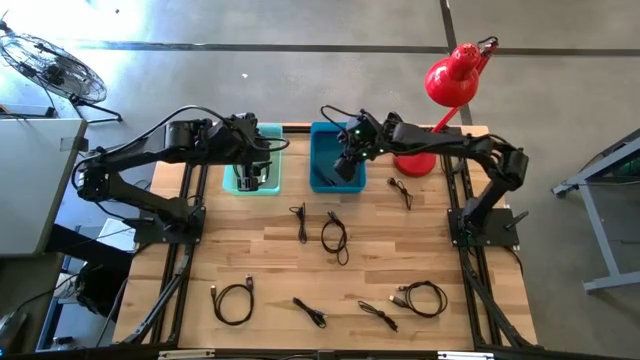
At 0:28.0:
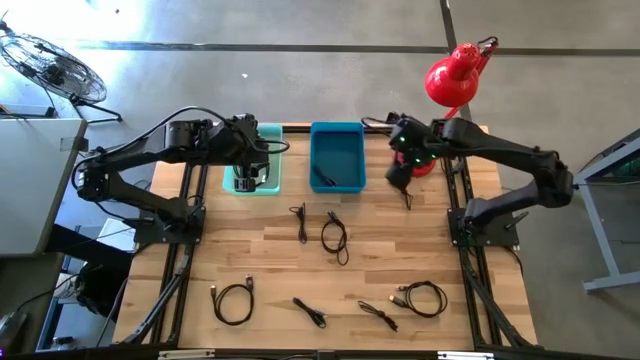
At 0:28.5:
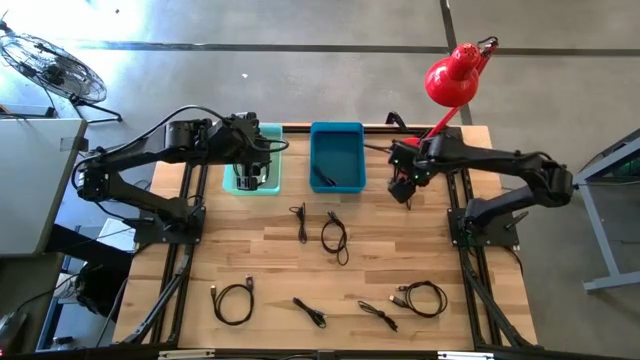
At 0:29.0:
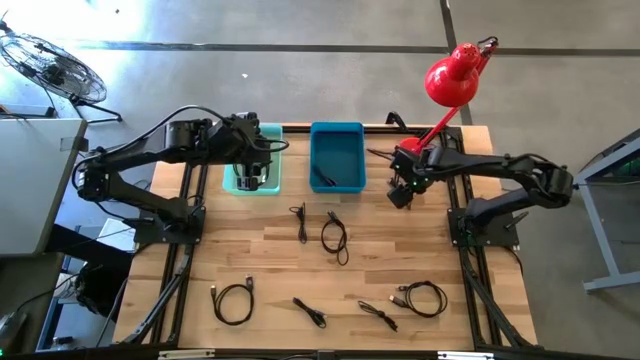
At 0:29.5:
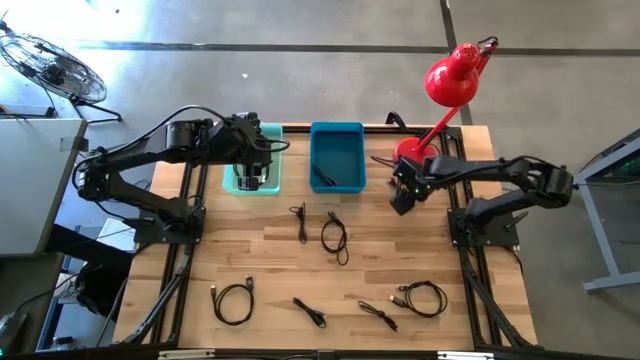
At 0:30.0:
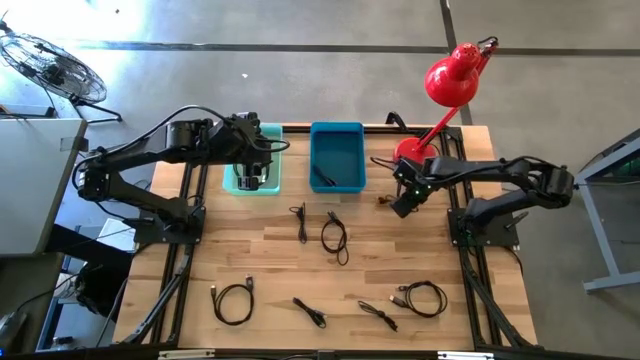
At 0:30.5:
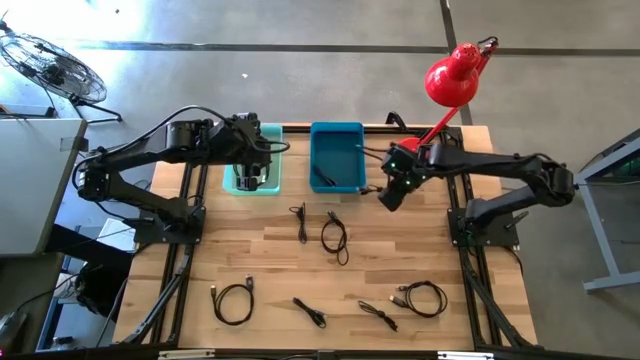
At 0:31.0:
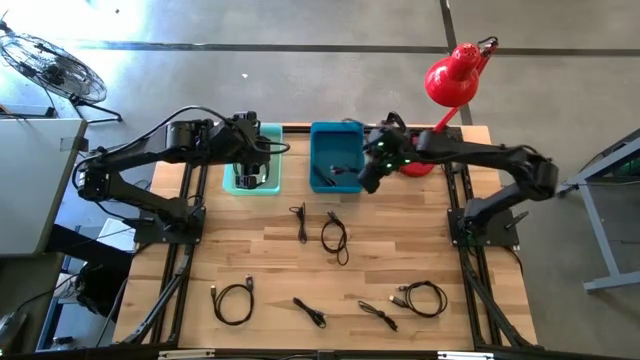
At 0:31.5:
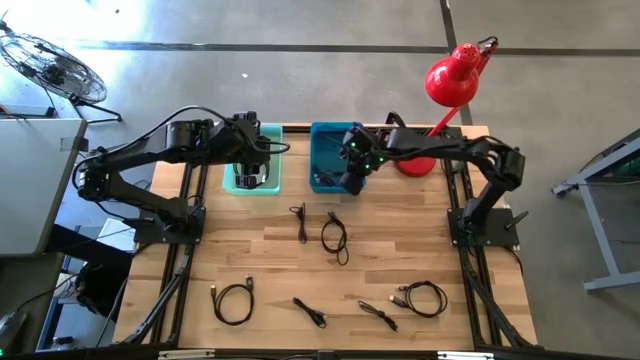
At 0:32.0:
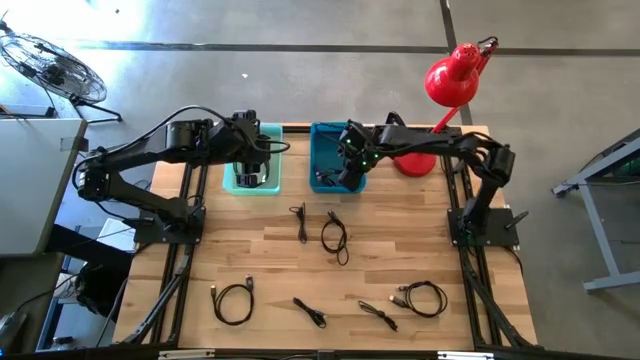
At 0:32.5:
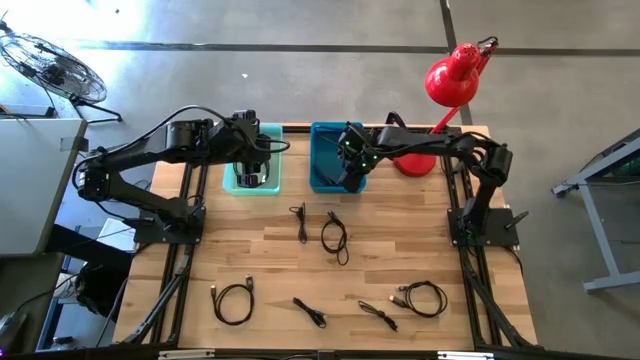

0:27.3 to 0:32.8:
Task: Pick & Place USB Port
Put the black USB cable into the blue bin

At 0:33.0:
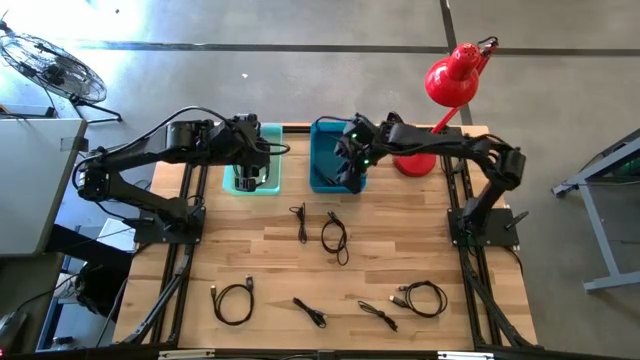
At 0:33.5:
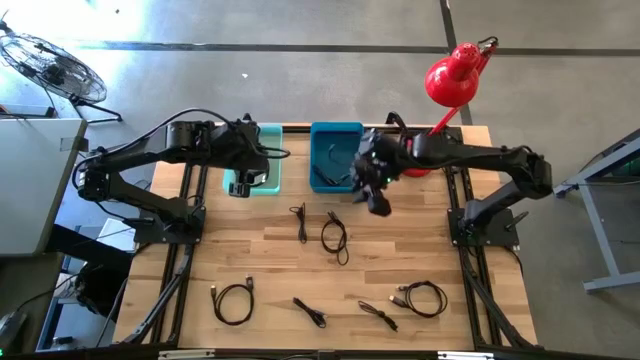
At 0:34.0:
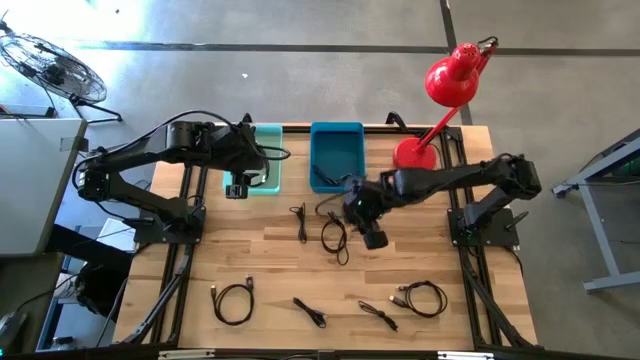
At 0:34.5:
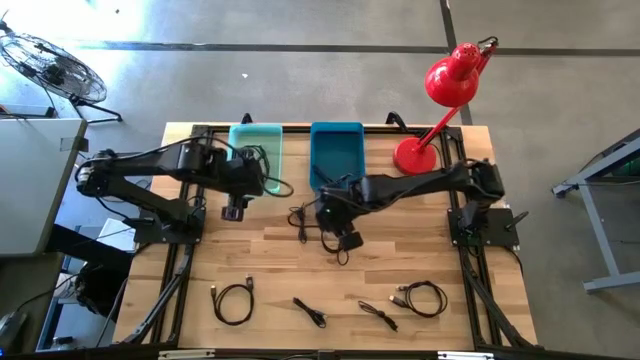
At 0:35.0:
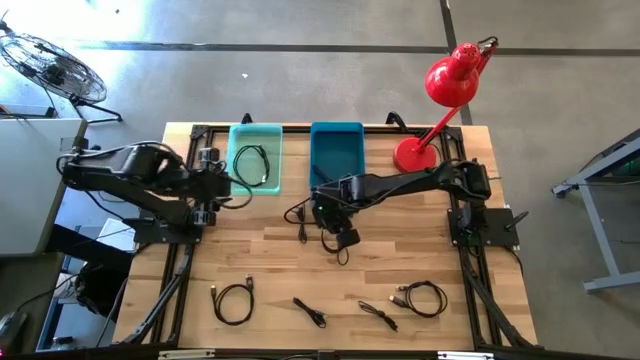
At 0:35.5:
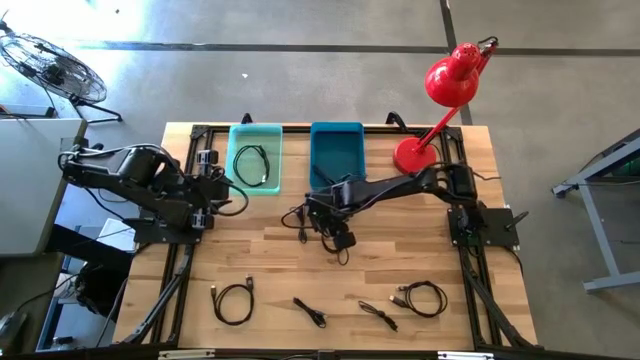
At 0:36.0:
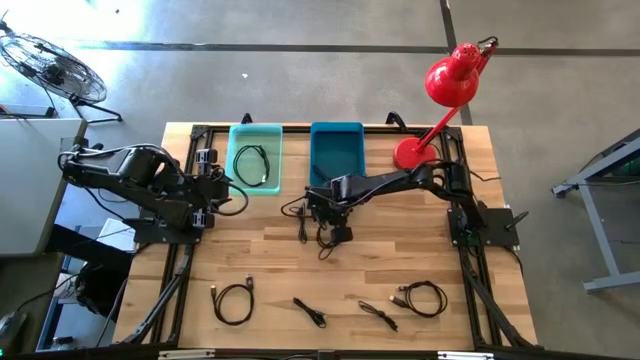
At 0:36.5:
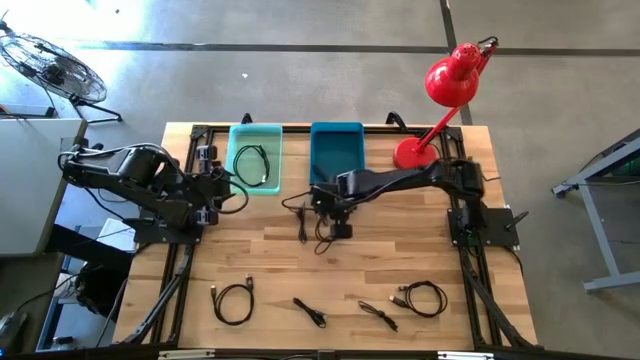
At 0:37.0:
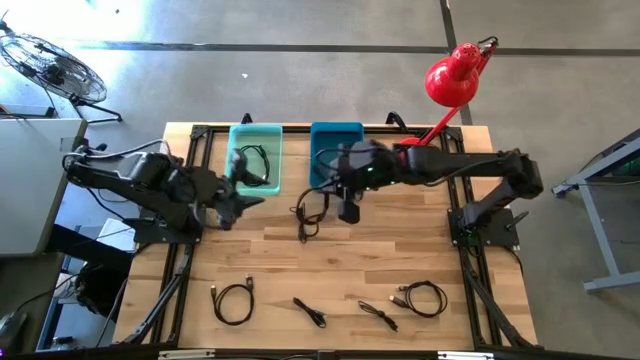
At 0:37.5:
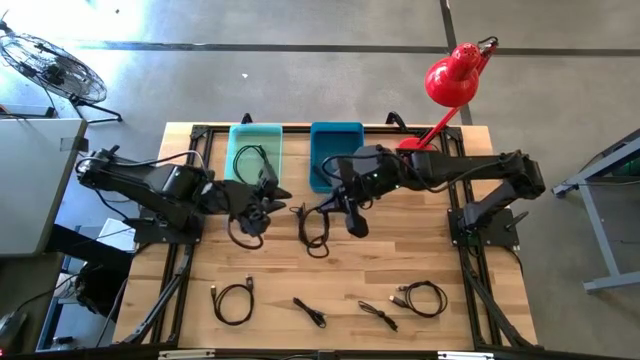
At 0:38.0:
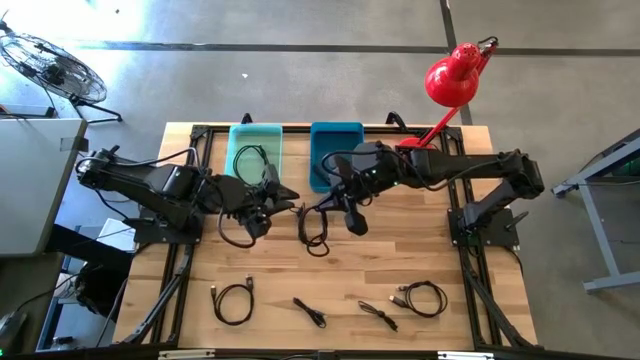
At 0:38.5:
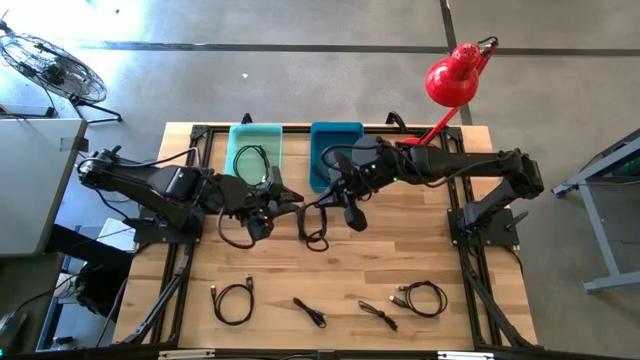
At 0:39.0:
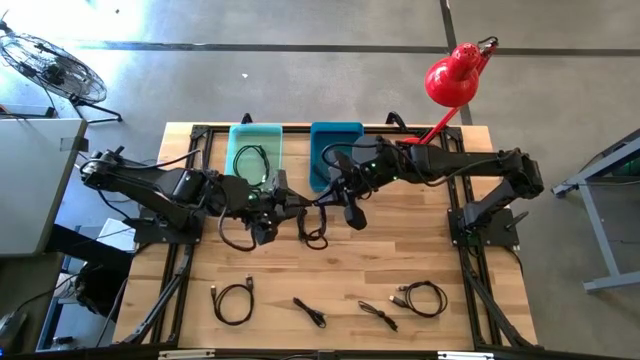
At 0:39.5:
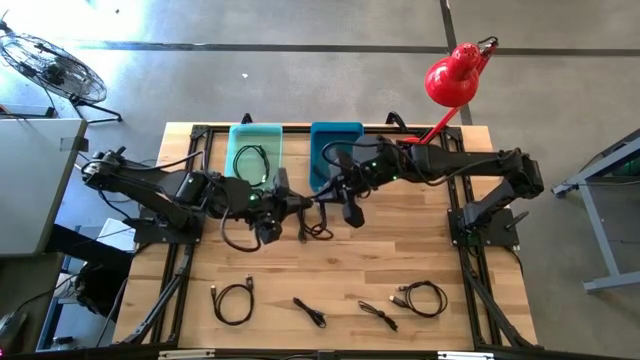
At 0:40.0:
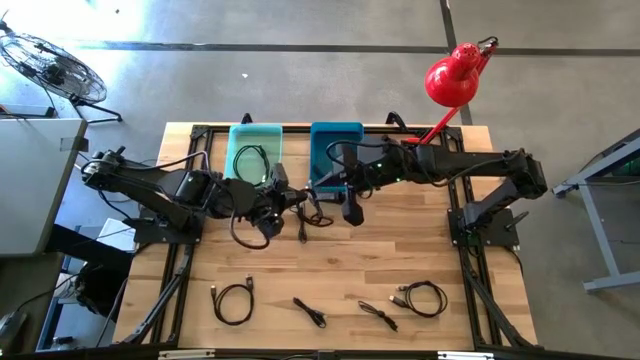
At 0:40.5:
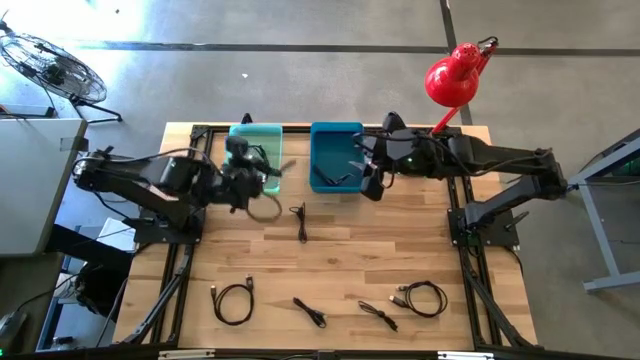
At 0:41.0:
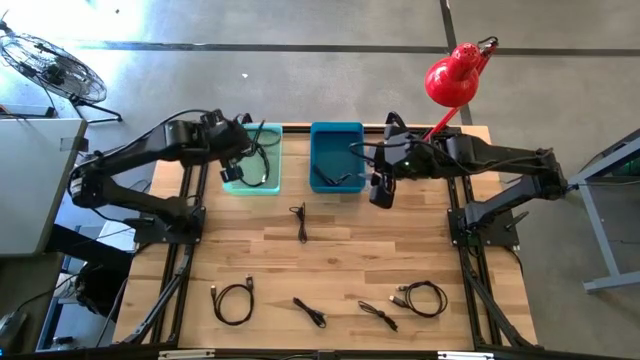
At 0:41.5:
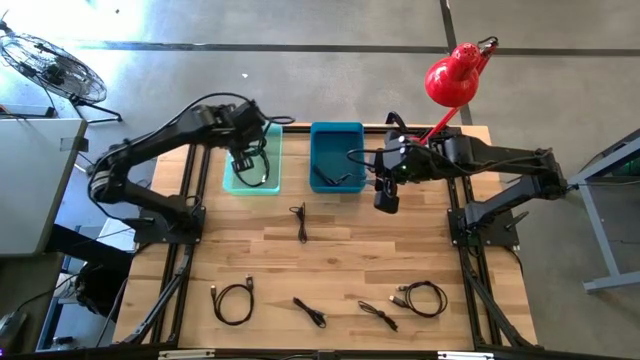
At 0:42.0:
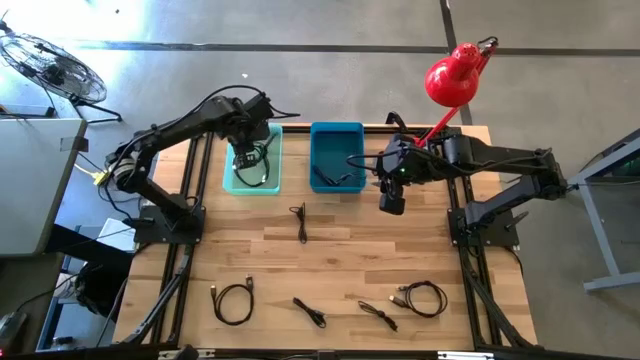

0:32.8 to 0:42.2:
Put the black HDMI cable into the green bin

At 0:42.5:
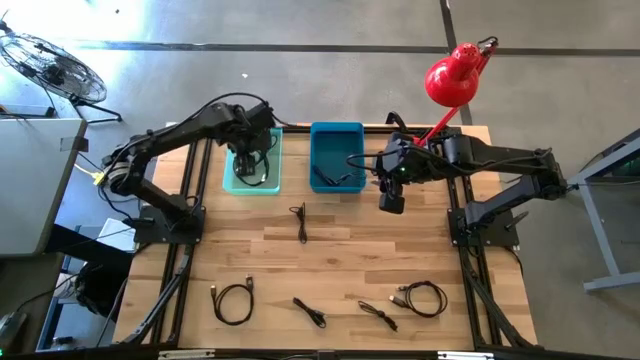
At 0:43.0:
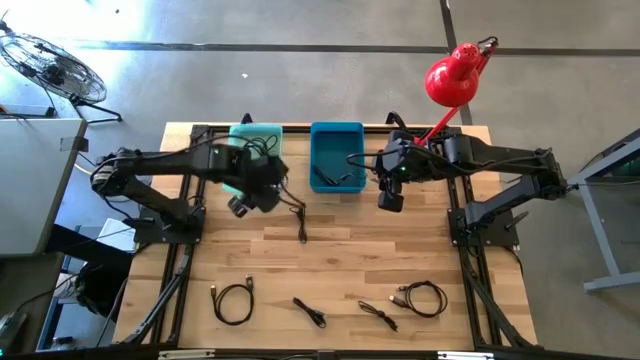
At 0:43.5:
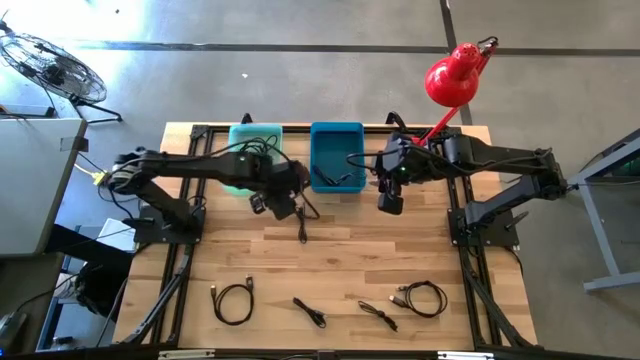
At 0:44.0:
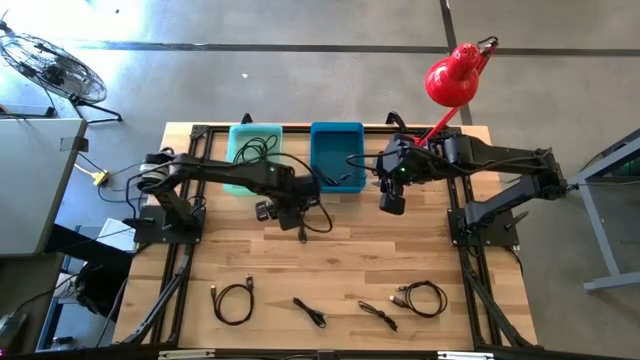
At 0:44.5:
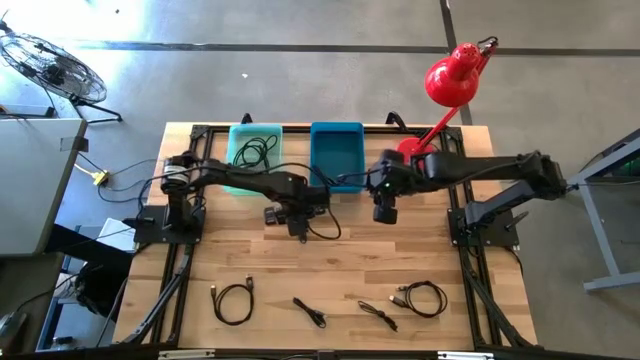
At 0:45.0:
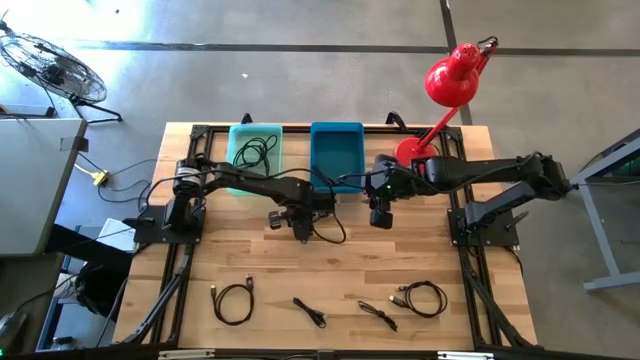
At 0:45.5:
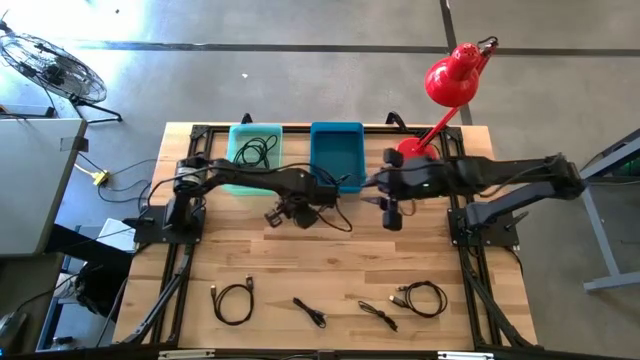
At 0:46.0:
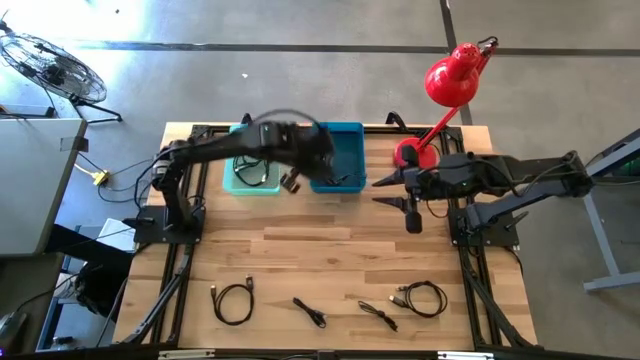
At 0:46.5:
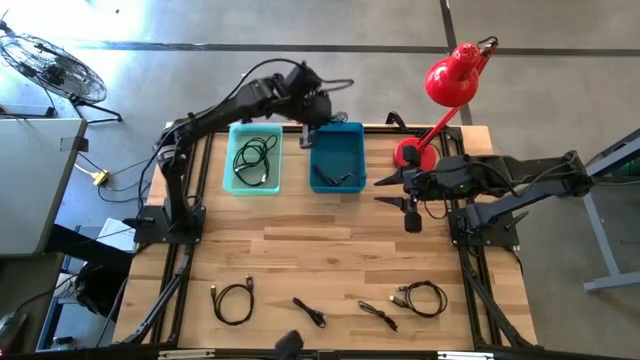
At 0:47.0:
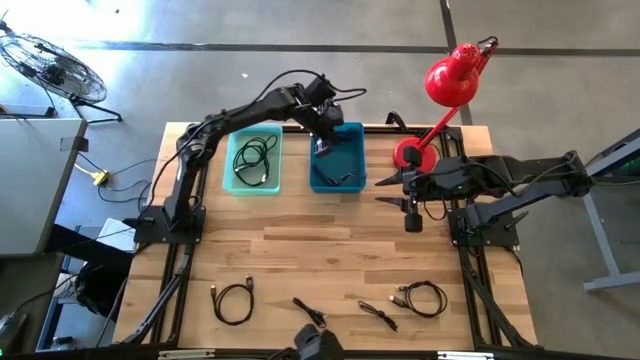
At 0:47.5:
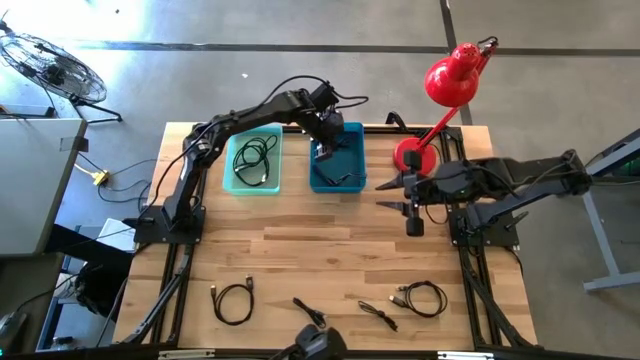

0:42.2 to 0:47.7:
Put the black USB cable into the blue bin
